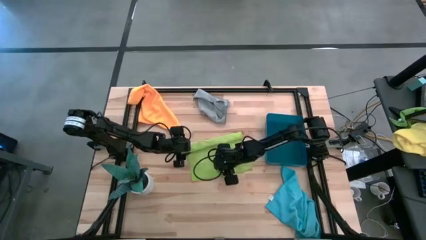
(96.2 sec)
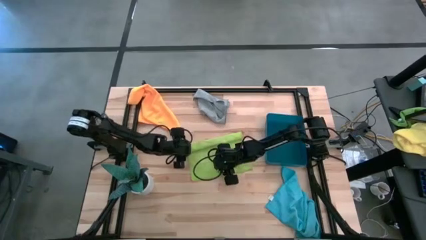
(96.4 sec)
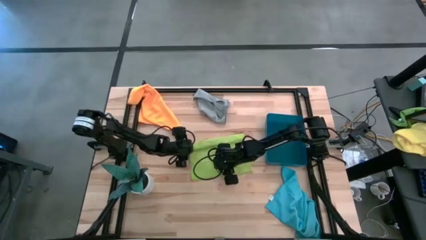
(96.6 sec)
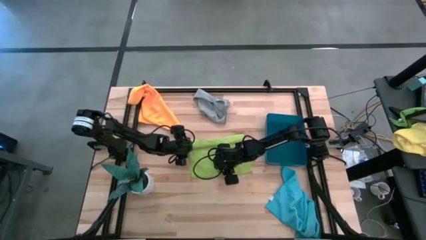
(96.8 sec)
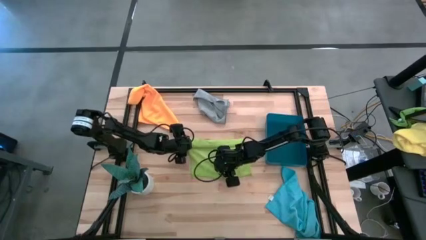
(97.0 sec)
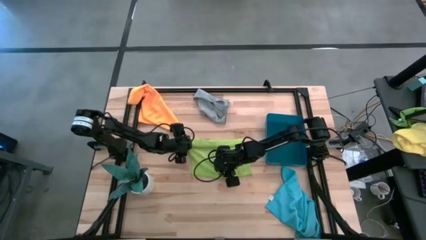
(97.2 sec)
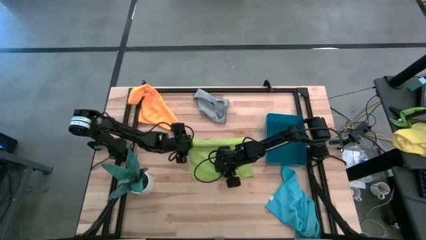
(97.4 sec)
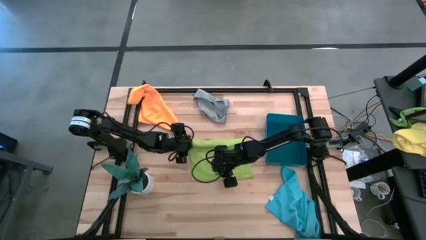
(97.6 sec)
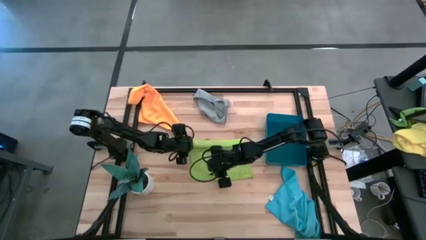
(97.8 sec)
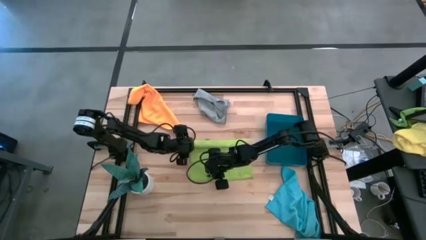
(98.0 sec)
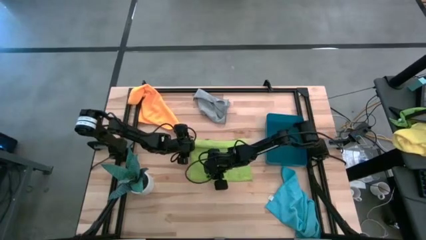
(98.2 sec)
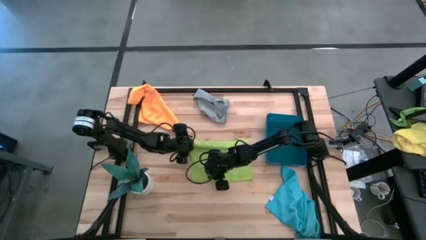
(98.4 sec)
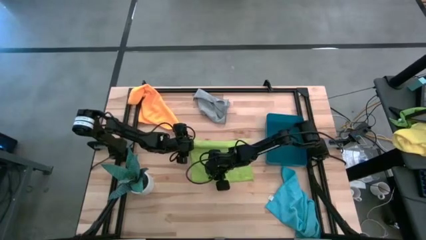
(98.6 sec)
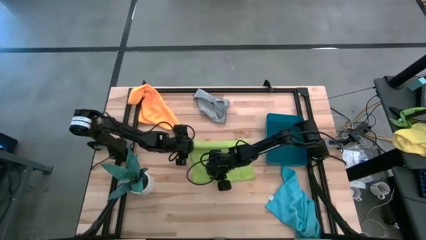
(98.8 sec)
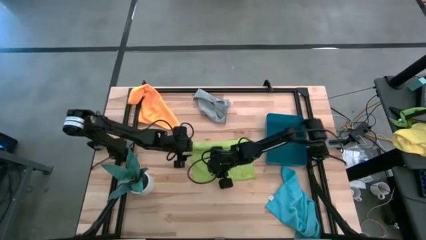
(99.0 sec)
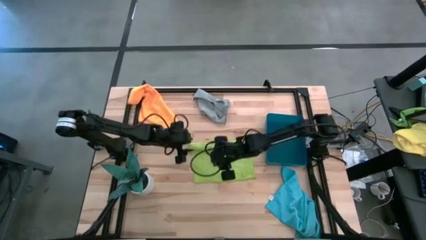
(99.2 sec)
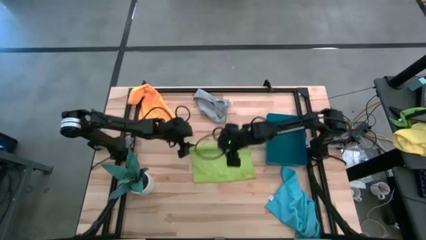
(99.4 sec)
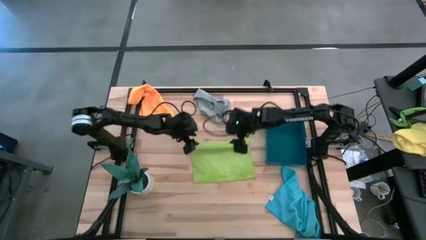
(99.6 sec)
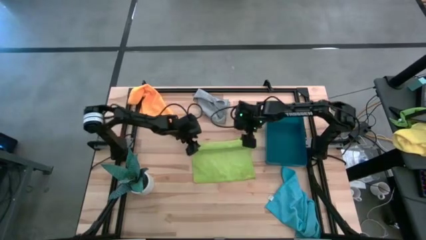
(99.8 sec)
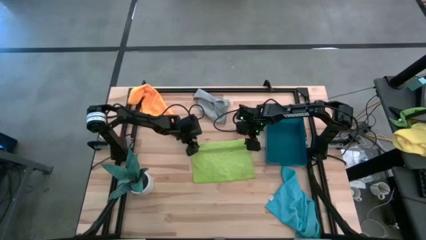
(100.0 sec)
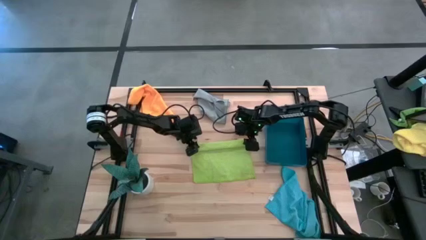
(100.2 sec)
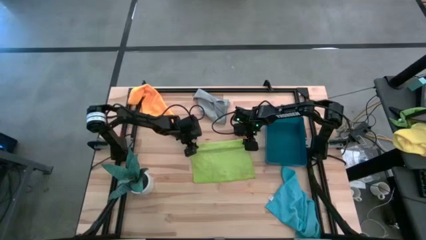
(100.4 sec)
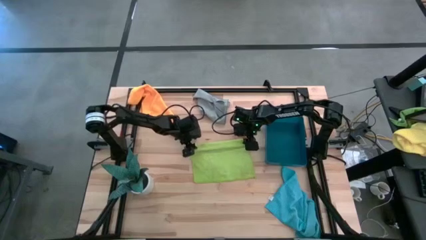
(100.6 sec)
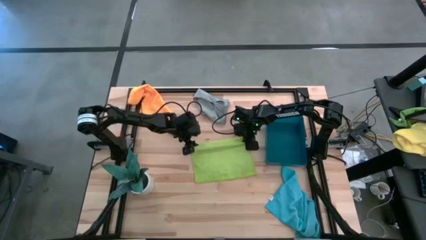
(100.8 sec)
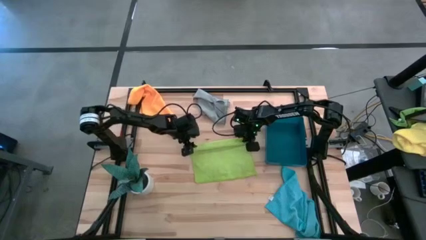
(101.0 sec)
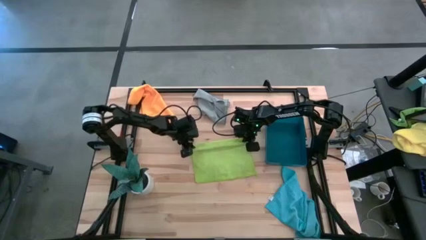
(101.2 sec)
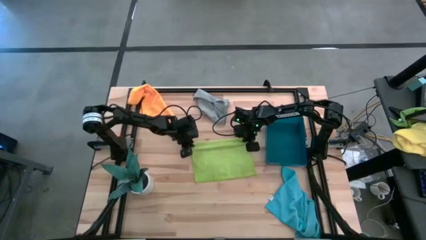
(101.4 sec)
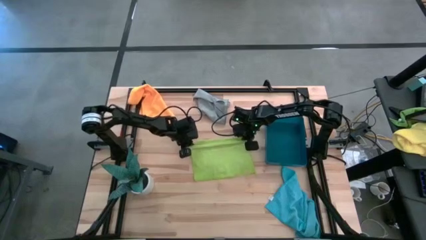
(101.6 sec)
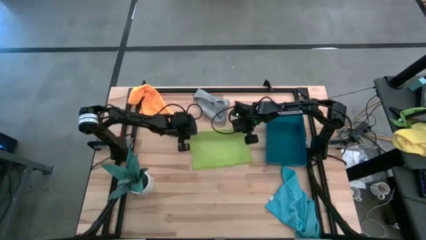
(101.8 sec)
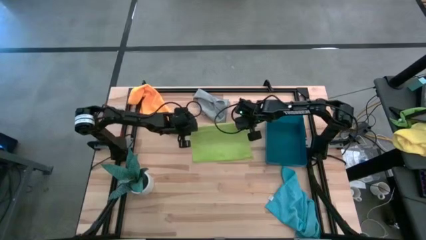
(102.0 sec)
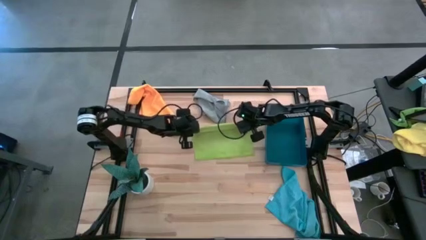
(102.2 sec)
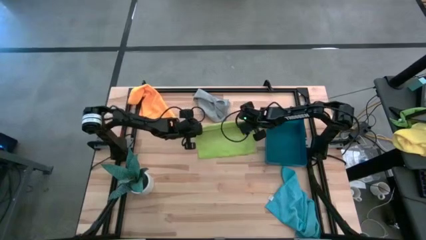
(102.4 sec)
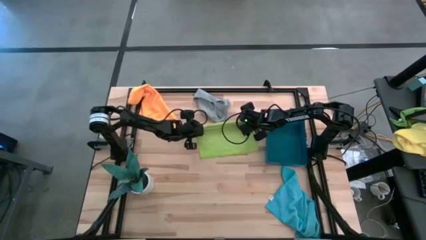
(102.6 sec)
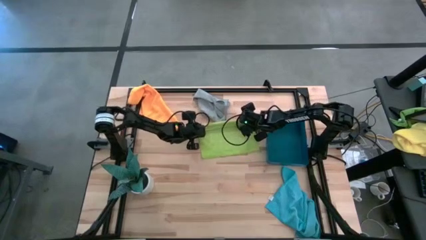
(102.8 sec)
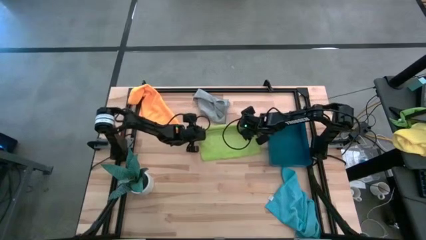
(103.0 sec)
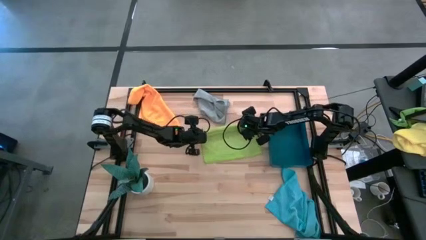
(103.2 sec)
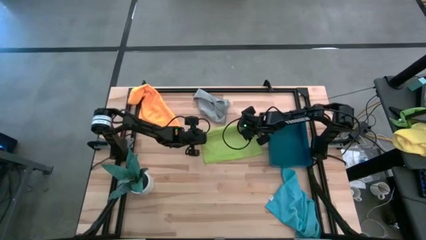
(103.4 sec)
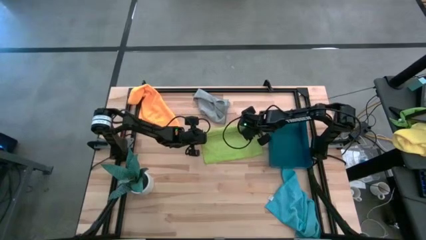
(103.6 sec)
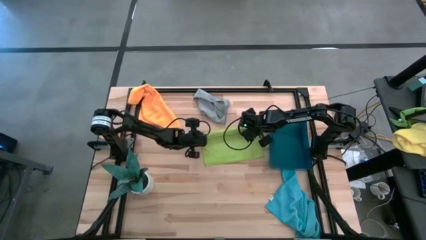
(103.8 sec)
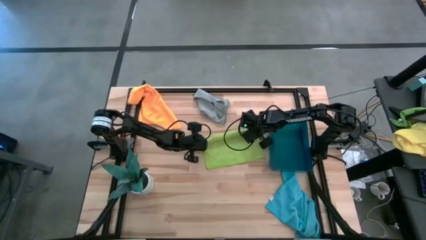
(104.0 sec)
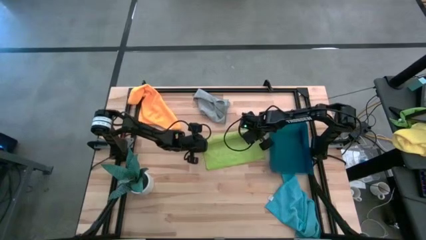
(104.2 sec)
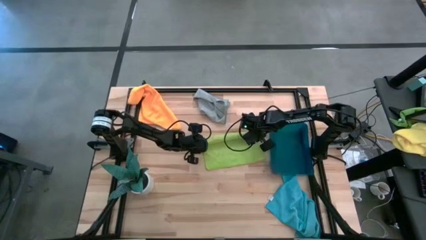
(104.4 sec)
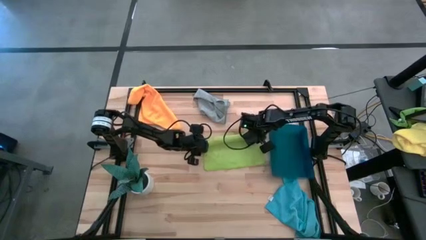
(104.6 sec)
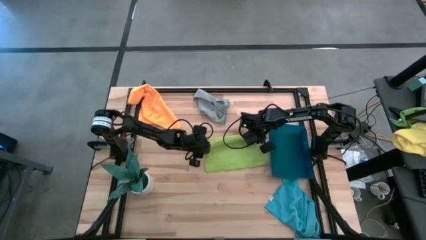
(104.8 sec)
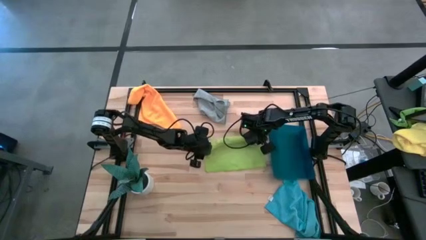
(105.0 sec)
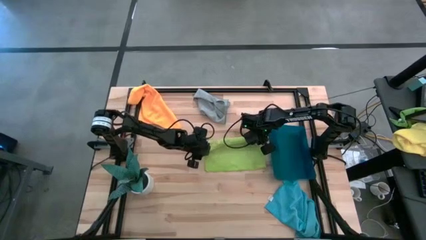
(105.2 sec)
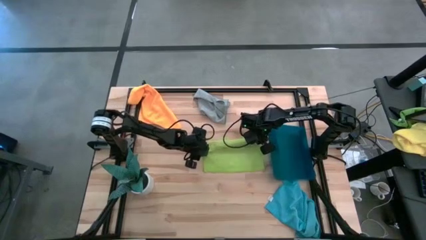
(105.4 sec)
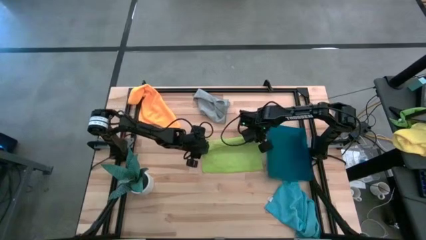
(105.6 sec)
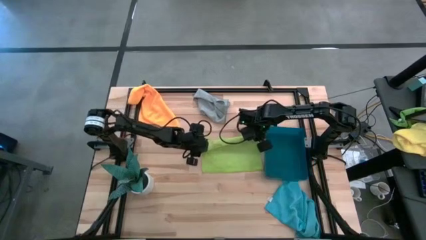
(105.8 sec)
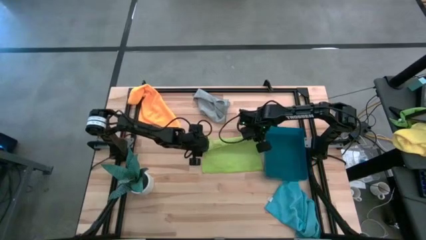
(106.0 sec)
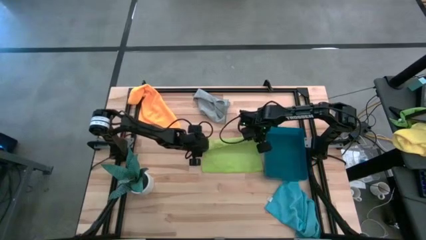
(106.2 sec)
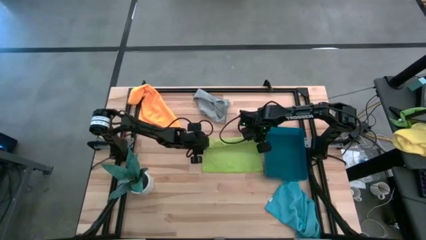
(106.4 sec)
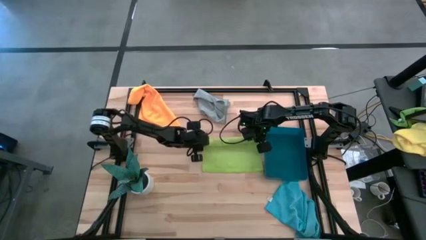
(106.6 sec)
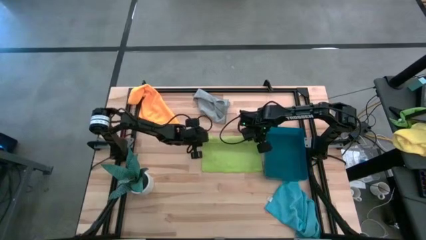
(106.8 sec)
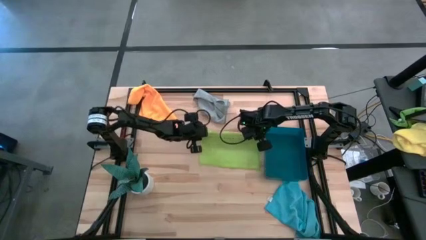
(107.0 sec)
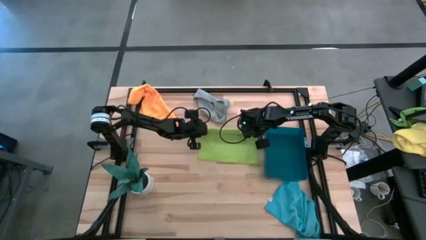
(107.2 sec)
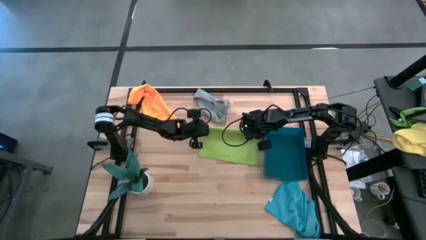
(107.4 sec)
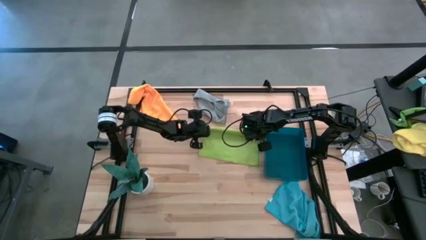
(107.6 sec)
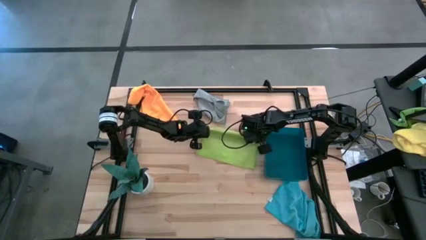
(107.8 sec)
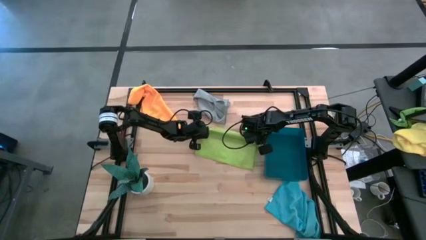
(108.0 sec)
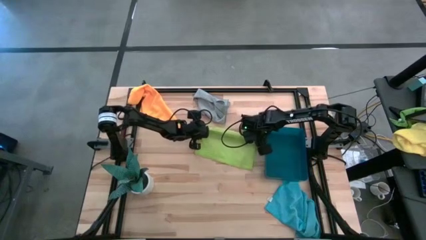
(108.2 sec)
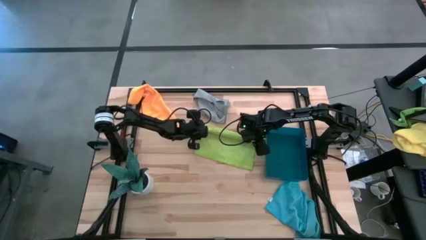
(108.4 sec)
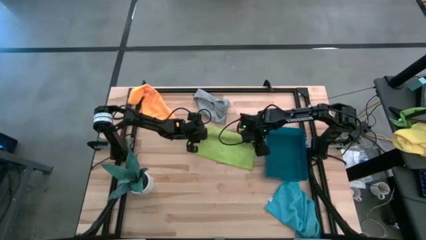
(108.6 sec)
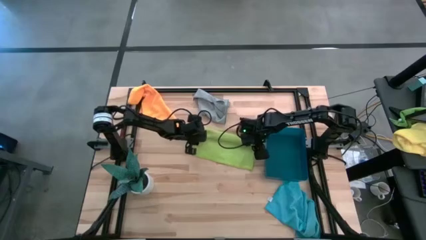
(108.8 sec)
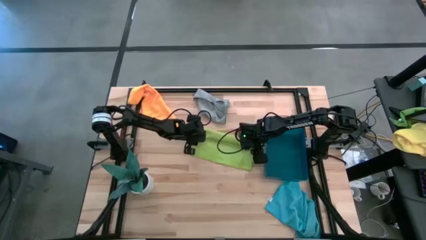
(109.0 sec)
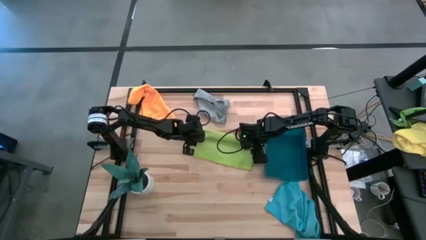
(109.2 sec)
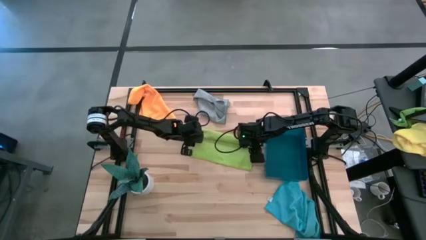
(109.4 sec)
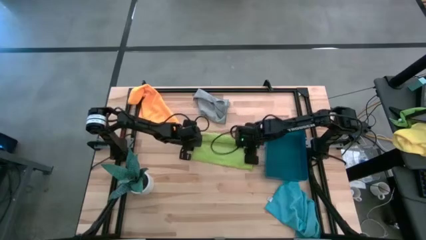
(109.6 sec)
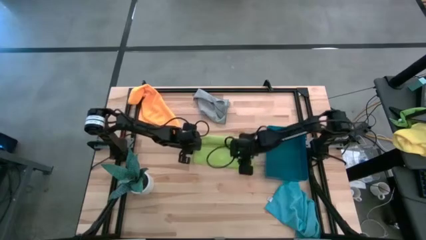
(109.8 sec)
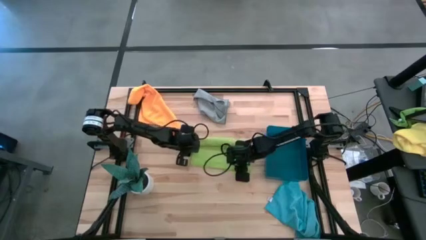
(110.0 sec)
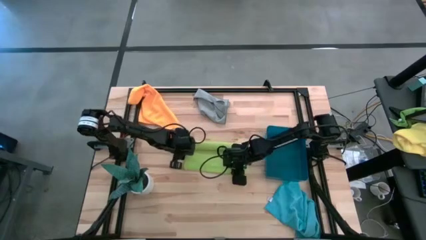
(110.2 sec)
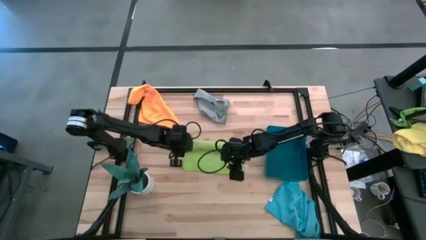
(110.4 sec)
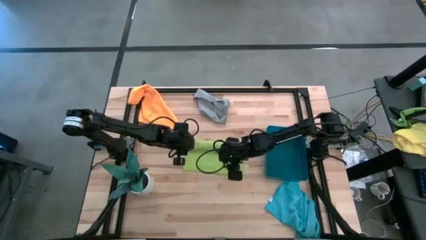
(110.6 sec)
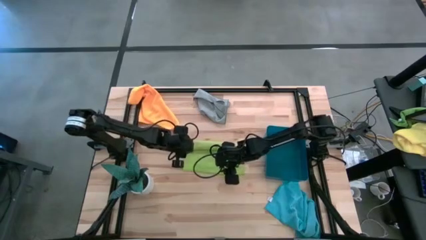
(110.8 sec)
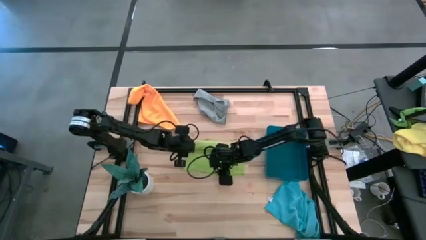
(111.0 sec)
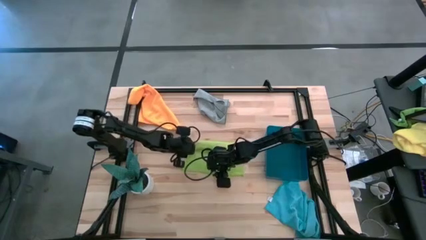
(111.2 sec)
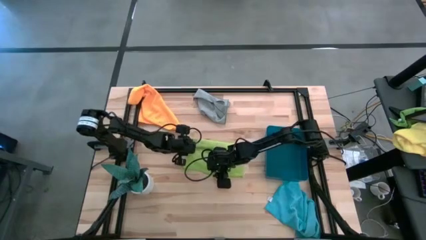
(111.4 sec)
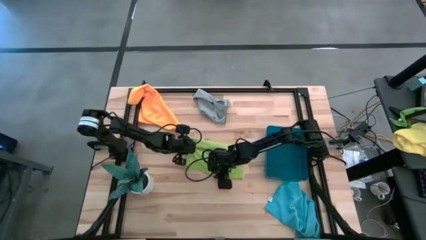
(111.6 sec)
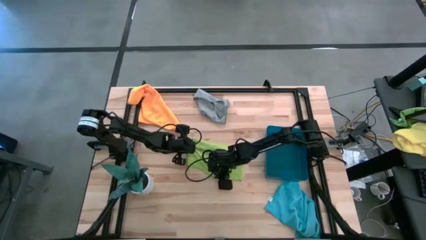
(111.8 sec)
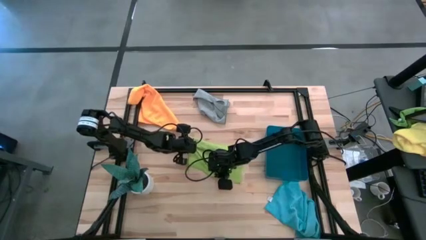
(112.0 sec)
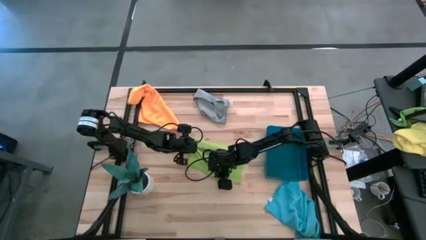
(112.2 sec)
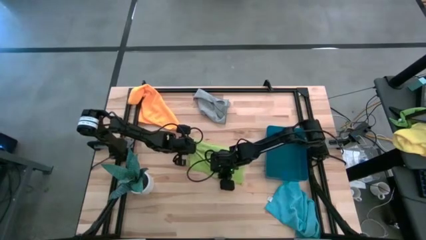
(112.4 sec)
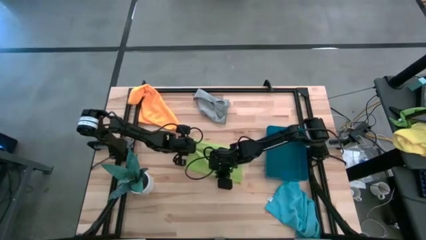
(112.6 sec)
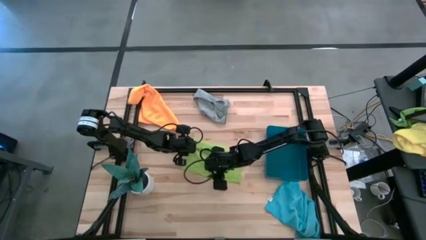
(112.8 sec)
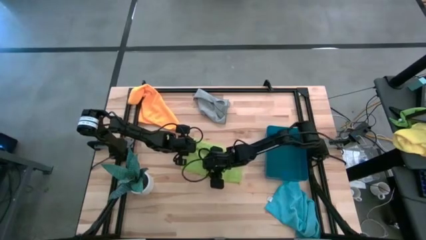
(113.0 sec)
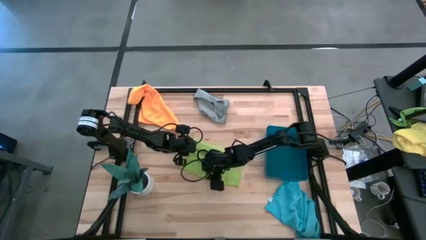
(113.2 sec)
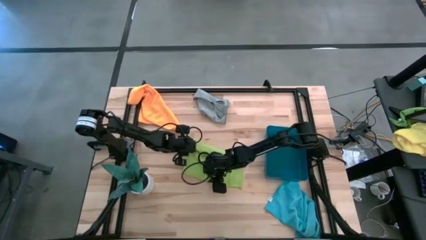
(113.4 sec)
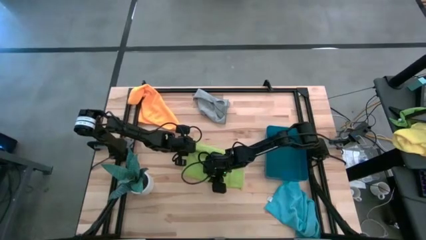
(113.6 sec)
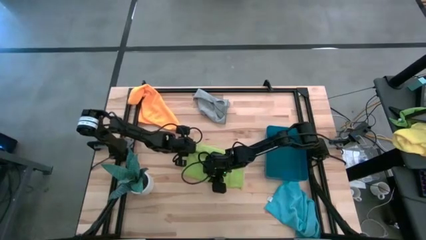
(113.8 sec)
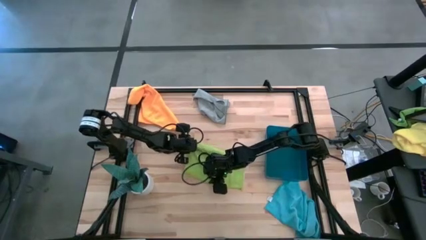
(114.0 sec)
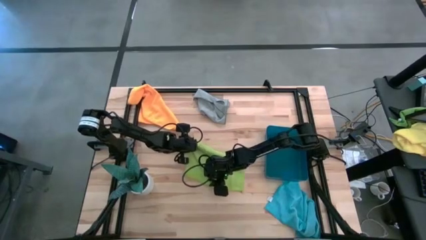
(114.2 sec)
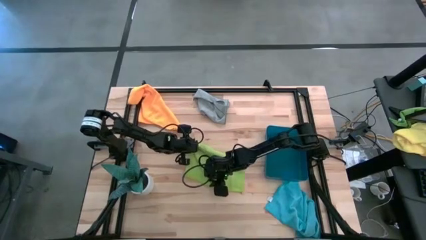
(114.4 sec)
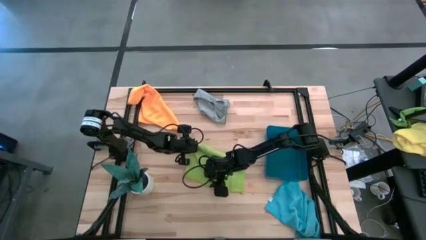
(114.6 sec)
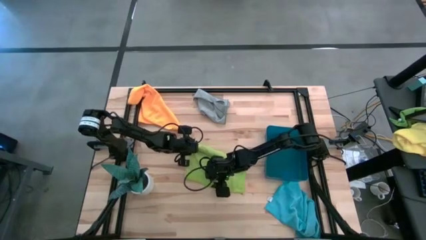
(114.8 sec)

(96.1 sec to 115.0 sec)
Task: Roll microfiber towels into tight, uniform cylinder then place into a basket
Roll the green towel
